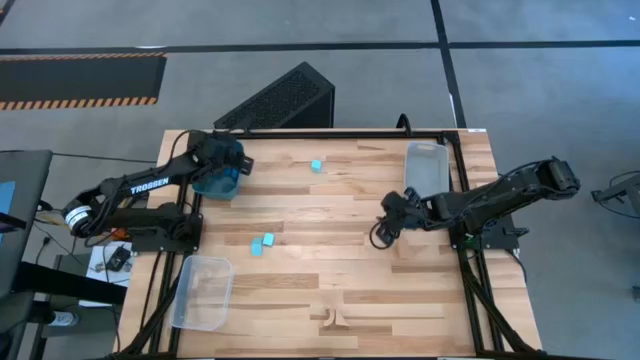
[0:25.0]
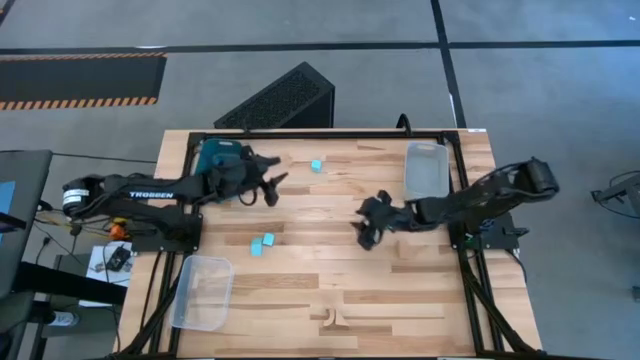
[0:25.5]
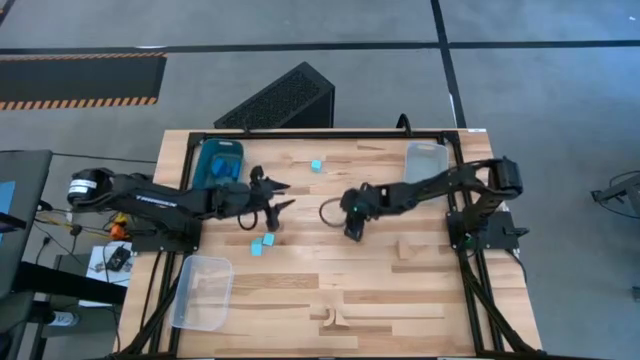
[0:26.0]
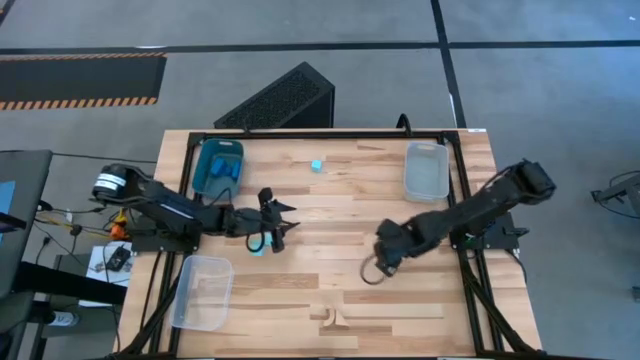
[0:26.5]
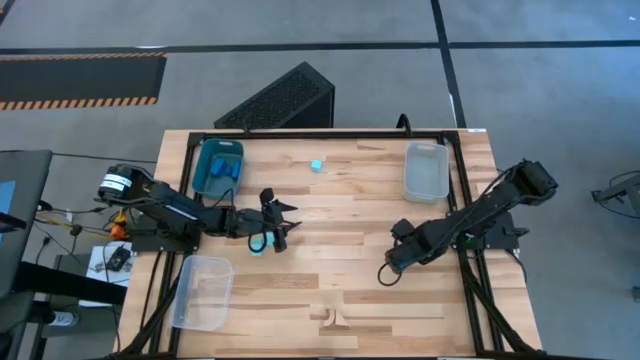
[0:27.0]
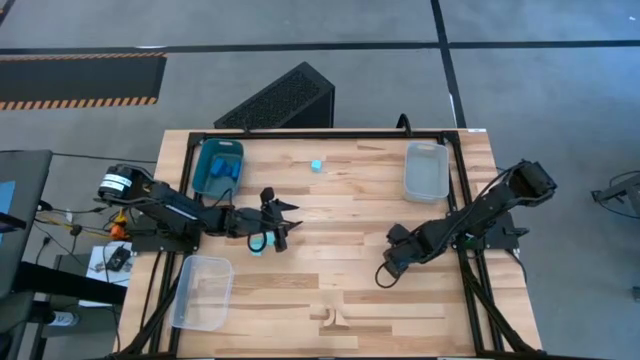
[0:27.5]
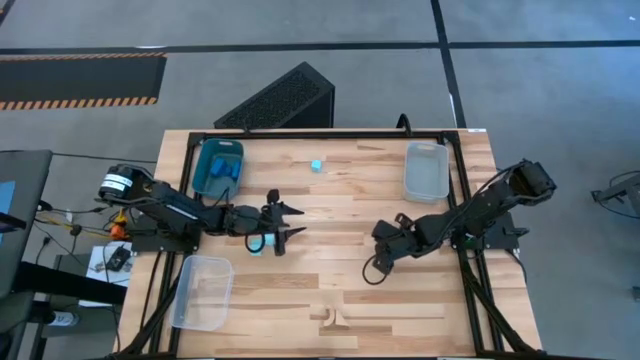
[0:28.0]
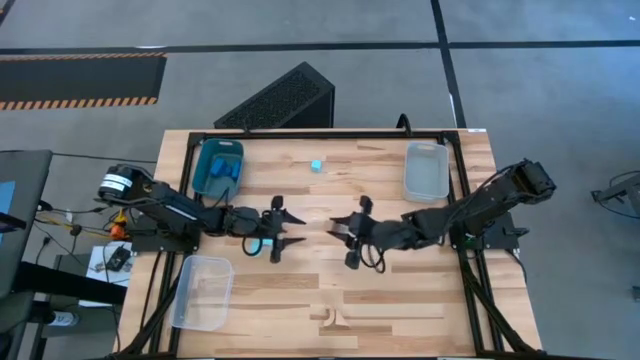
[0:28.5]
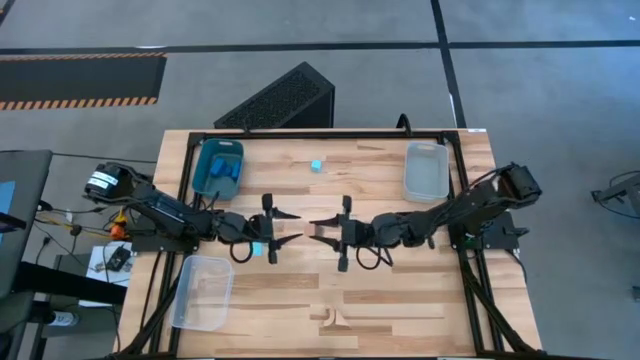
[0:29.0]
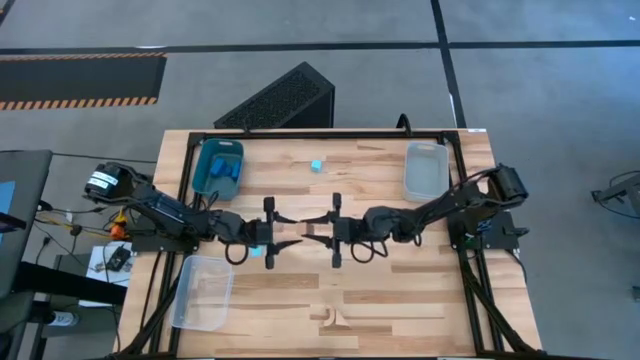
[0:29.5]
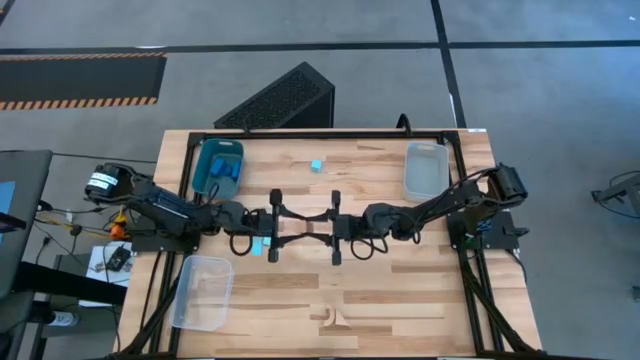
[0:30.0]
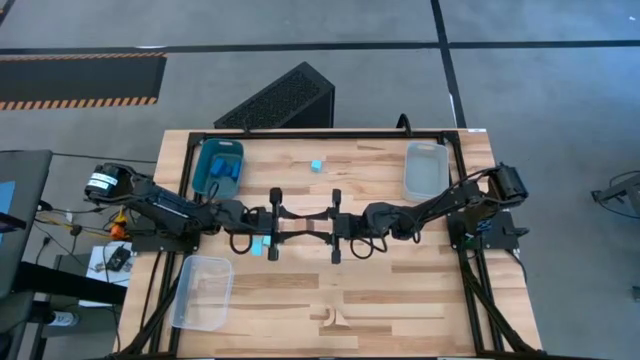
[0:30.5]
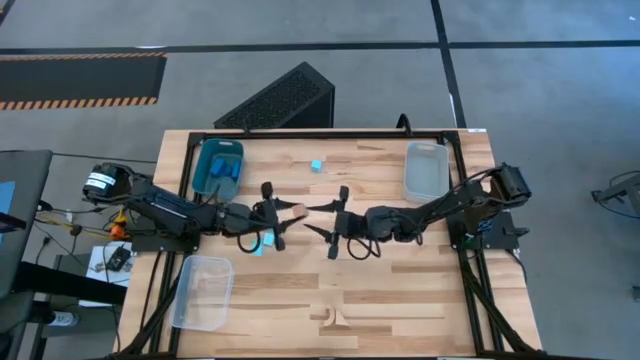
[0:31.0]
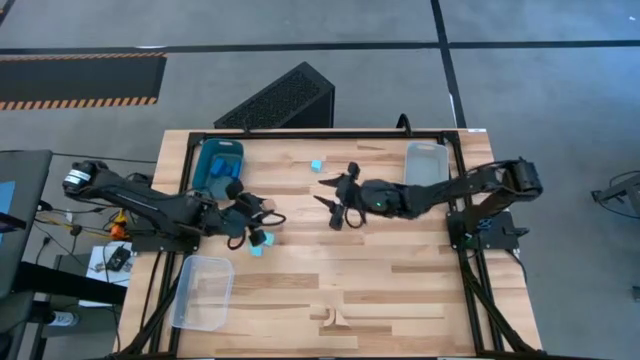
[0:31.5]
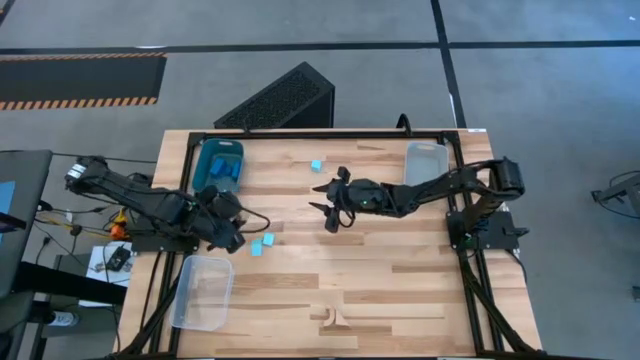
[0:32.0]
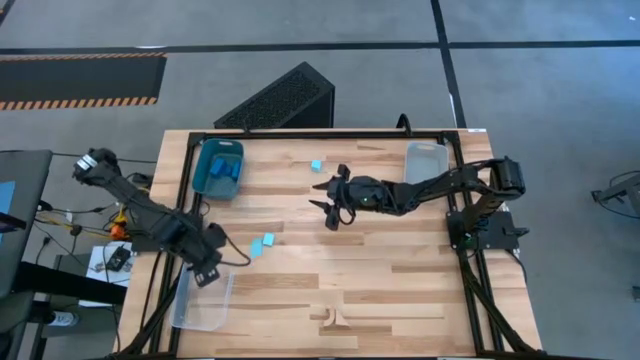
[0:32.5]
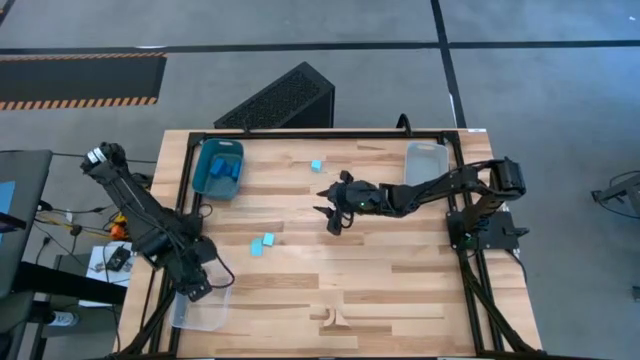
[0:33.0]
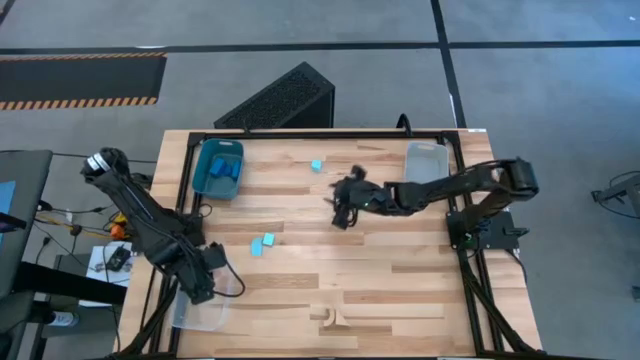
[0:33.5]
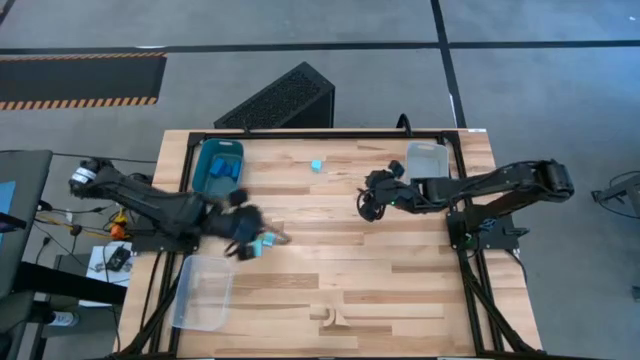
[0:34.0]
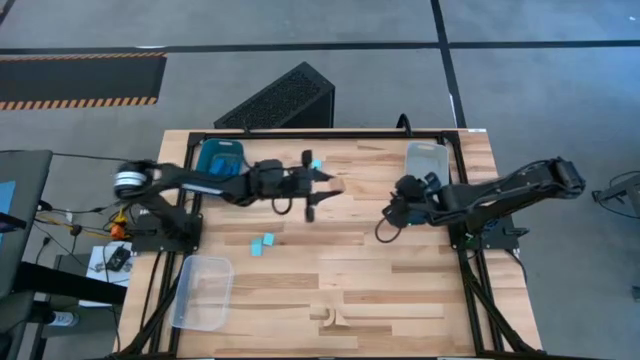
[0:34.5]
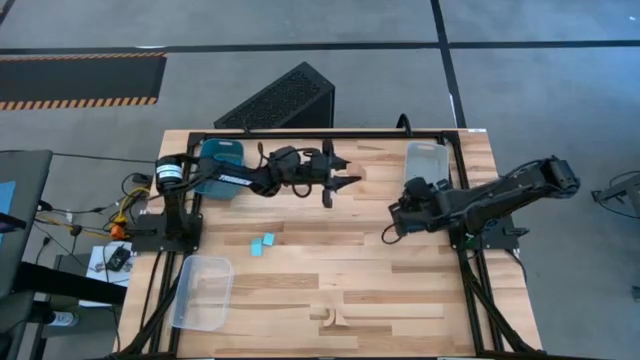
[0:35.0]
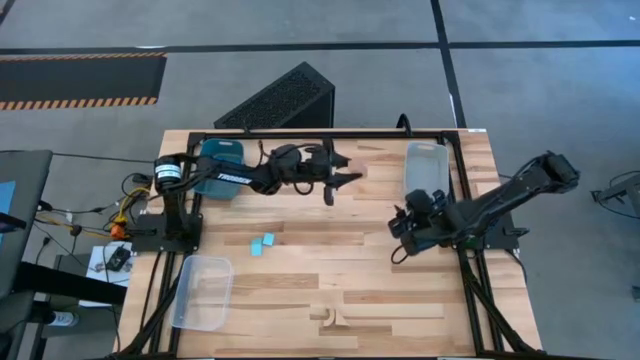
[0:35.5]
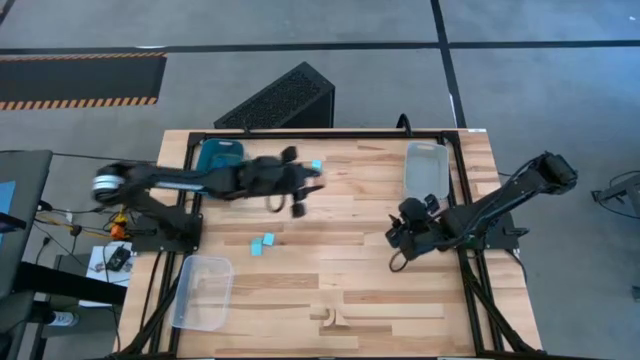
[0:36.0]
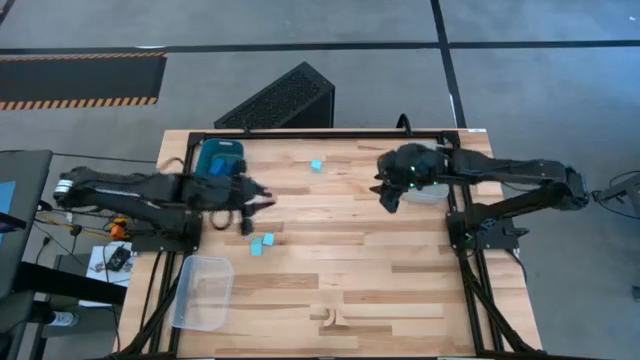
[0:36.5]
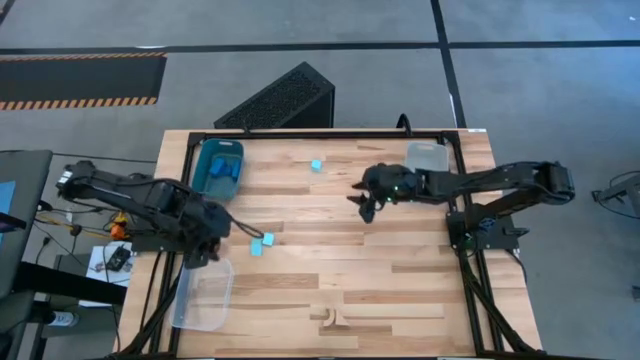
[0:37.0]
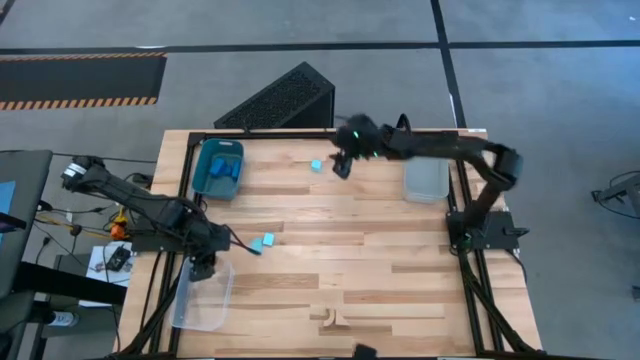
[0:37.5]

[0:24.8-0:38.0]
Task: Sort & place blocks by color
Put the top brown block into the transparent bin

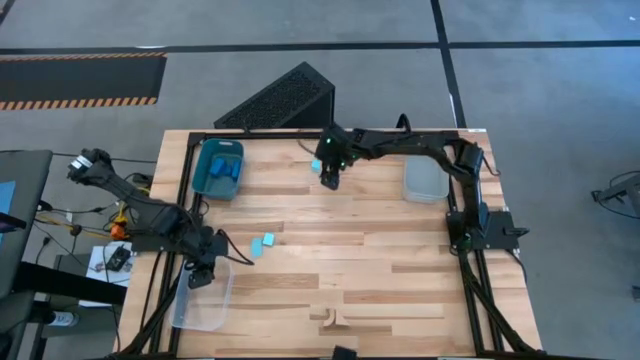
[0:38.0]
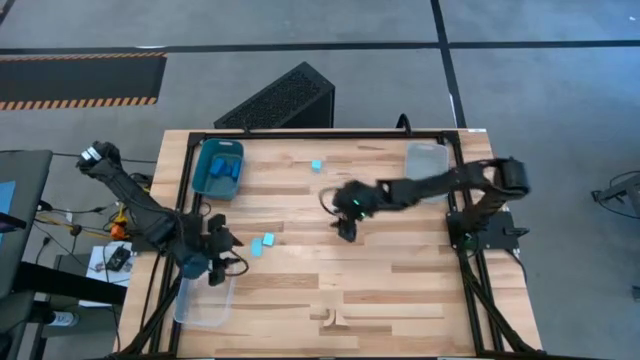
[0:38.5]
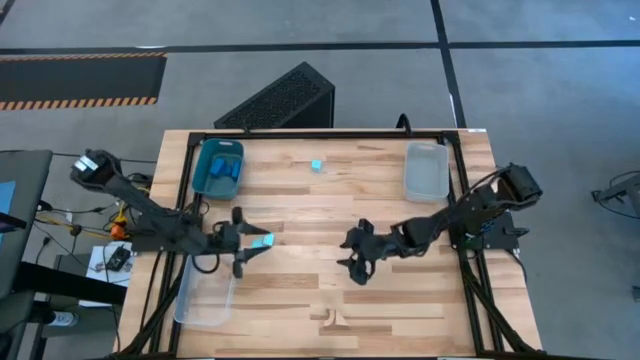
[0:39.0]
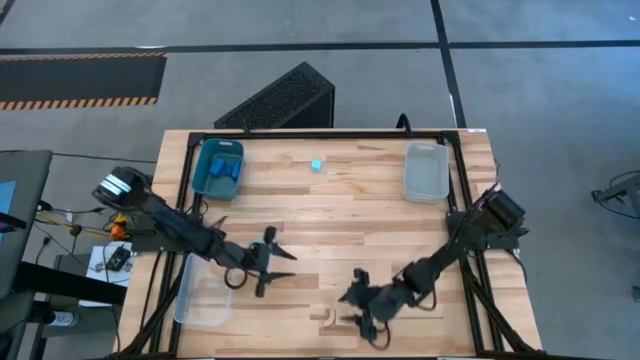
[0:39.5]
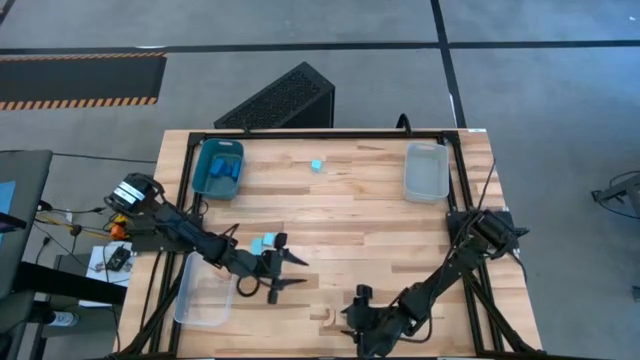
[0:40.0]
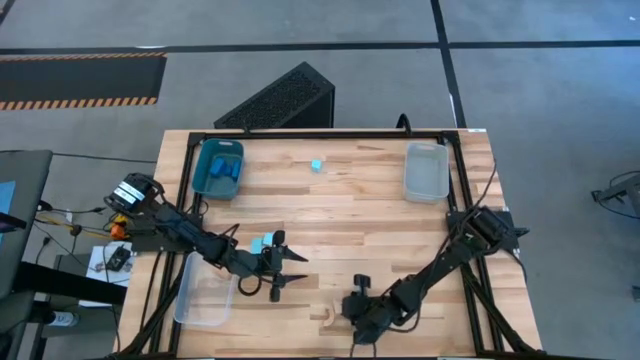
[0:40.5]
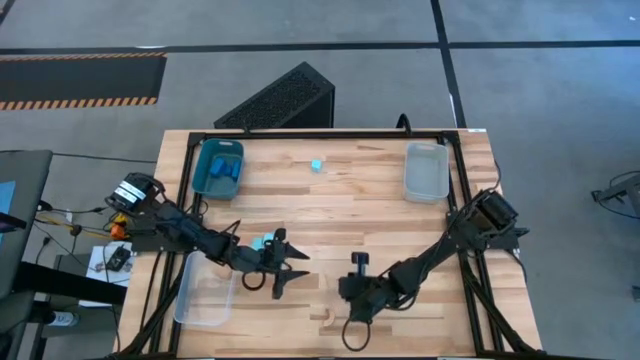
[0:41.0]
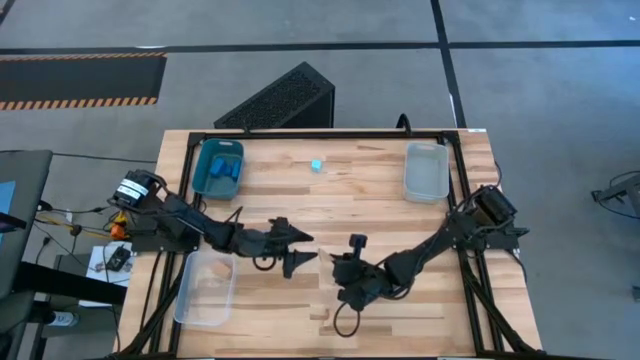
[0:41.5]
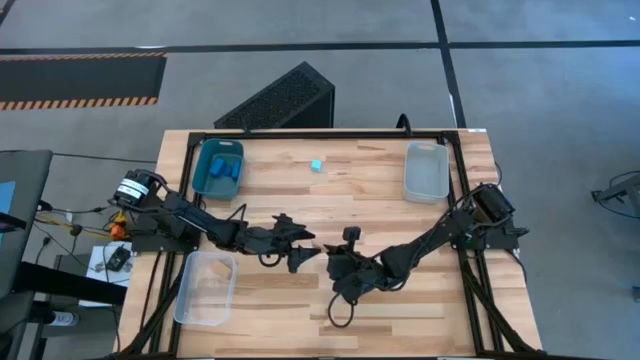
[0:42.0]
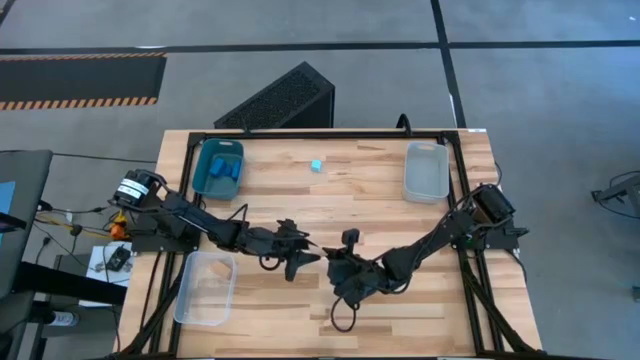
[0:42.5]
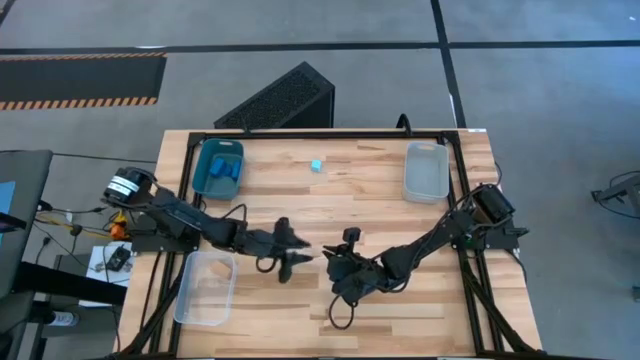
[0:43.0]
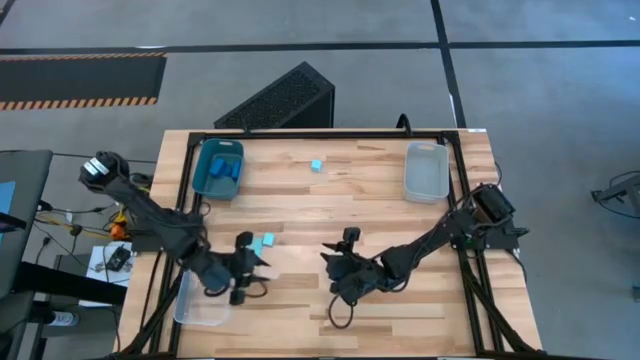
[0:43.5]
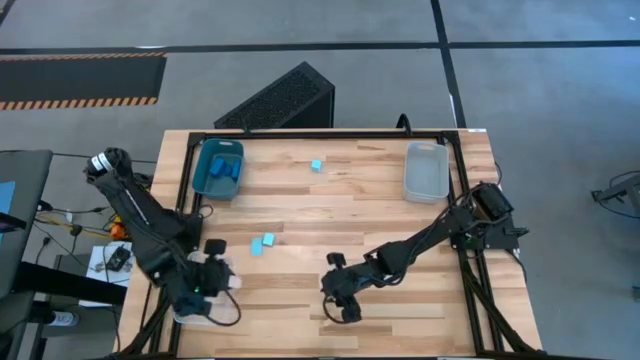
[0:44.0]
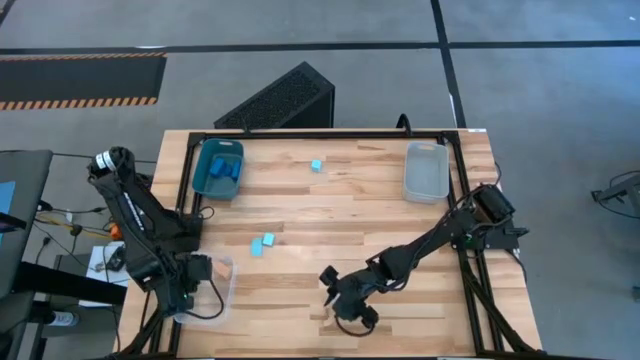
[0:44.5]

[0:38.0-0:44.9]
Put the right brown block into the transparent bin

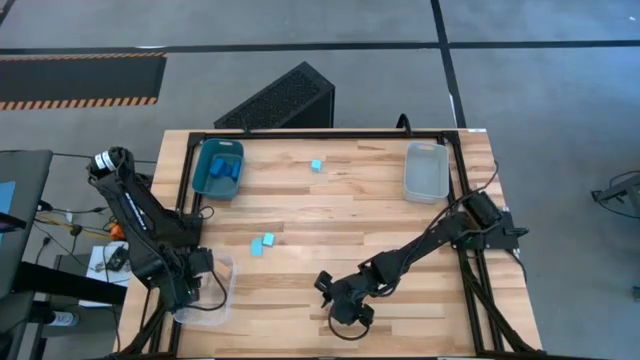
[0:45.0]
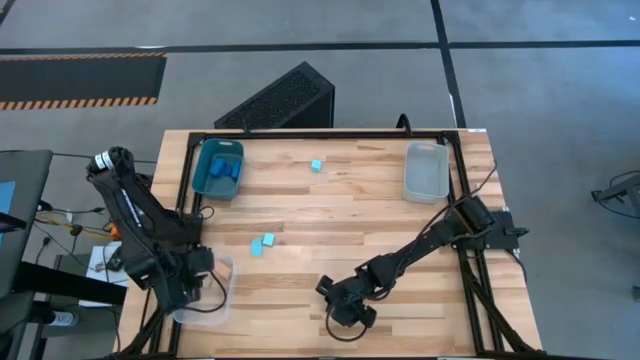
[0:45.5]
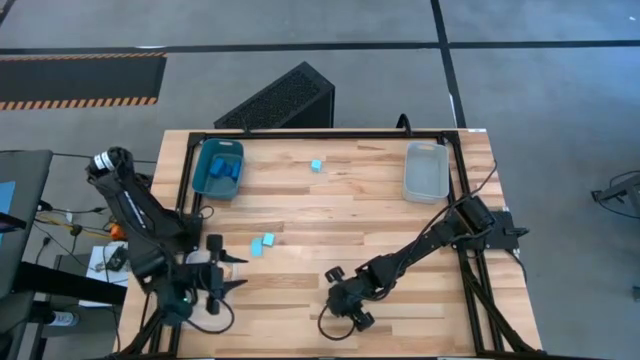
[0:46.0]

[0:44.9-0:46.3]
Put the brown block into the transparent bin
